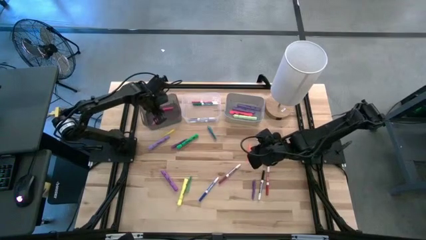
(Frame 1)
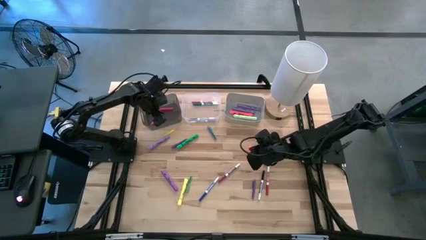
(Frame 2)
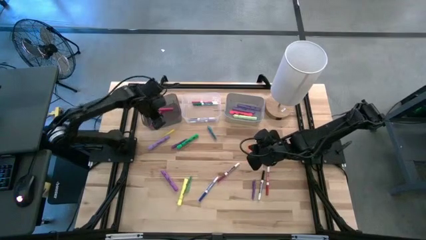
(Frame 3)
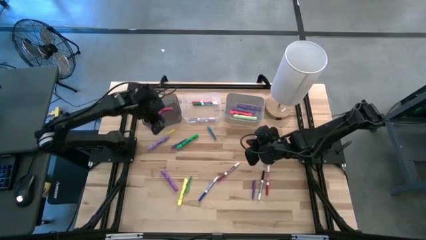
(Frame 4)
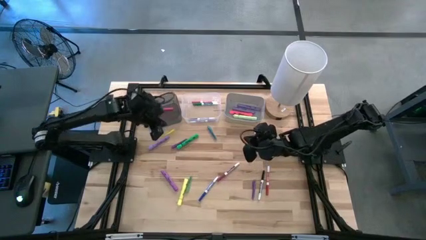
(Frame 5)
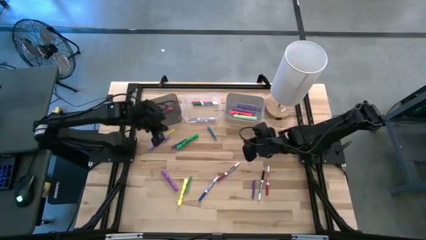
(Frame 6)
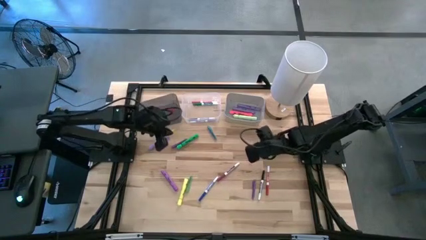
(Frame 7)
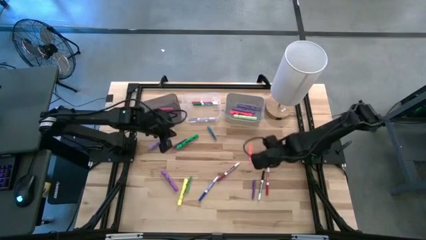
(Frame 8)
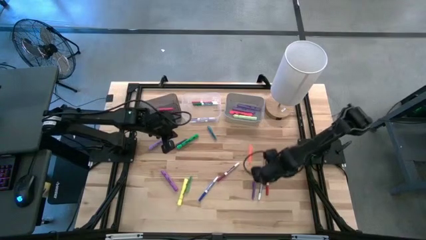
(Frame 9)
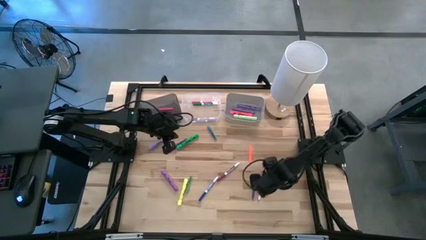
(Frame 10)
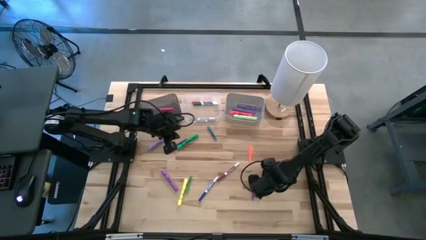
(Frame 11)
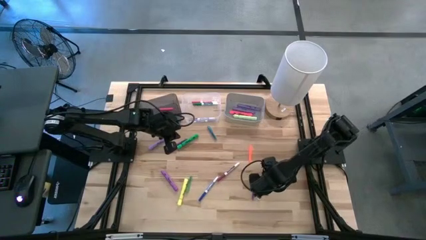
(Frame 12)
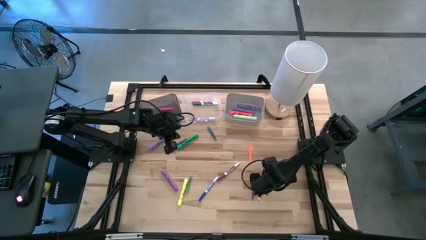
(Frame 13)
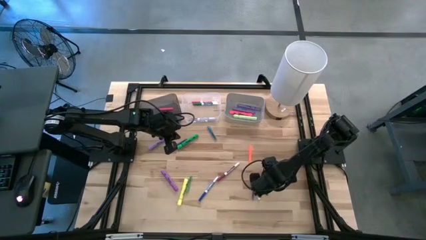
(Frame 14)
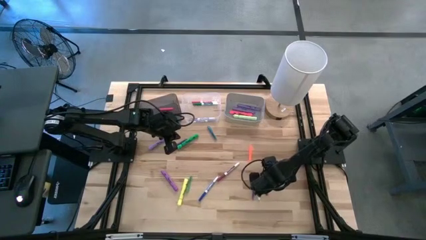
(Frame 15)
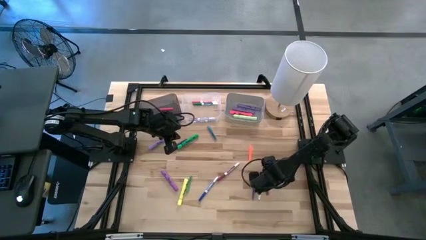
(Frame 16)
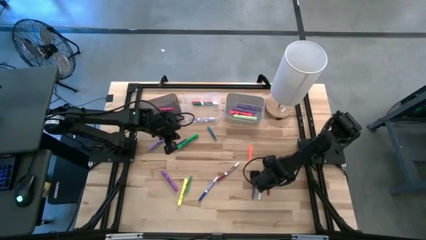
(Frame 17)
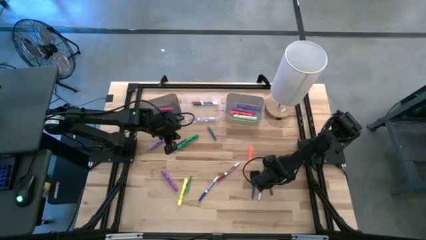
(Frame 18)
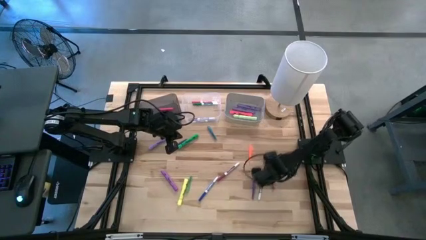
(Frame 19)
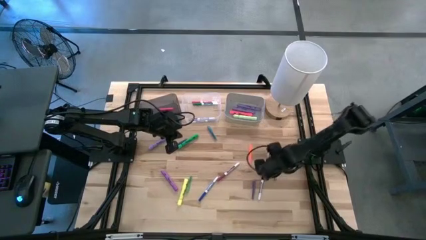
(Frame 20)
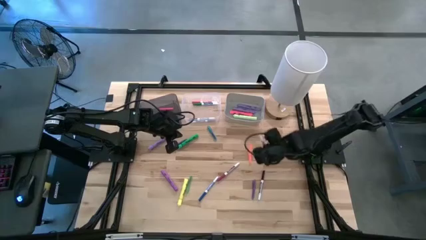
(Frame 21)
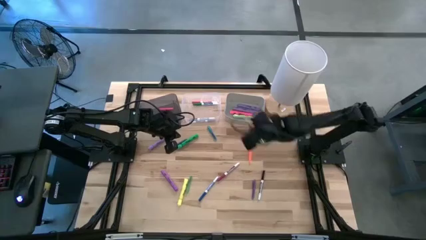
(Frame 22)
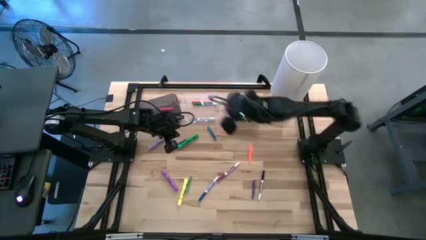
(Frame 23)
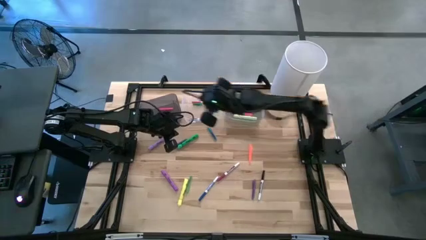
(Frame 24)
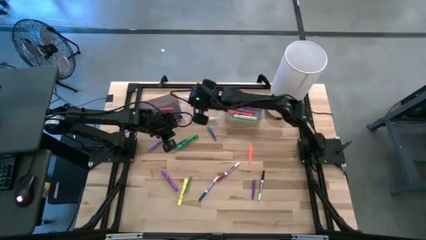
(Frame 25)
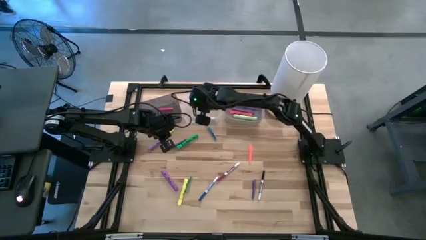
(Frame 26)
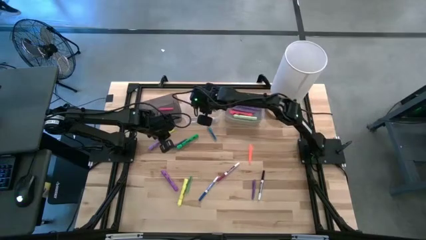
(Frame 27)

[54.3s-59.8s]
Task: Pick & Place Markers
Put the red marker pen into the transparent bin

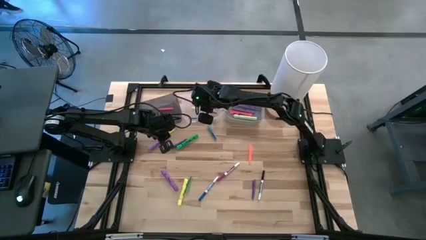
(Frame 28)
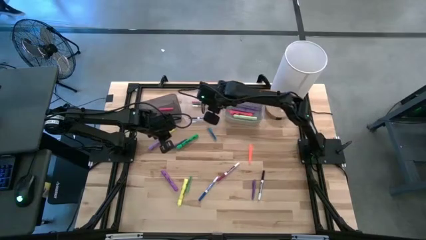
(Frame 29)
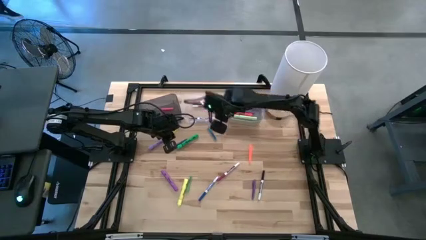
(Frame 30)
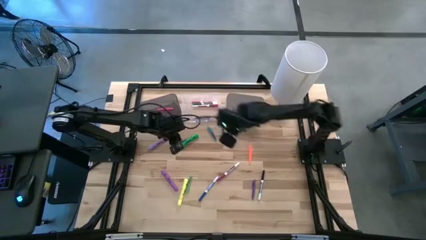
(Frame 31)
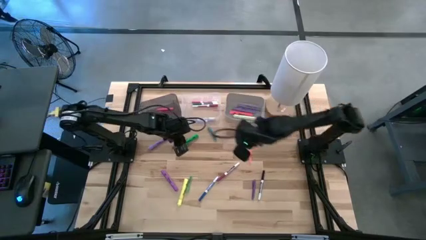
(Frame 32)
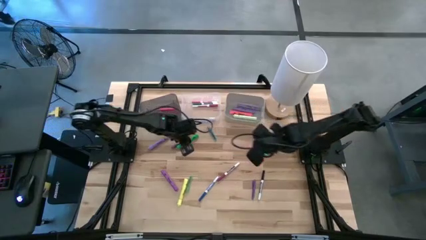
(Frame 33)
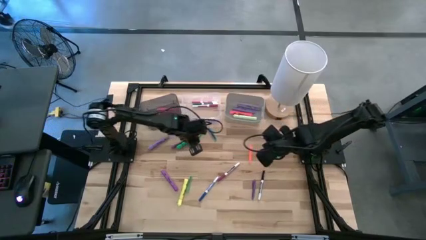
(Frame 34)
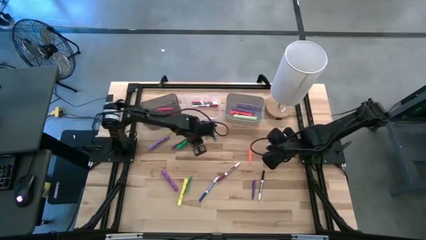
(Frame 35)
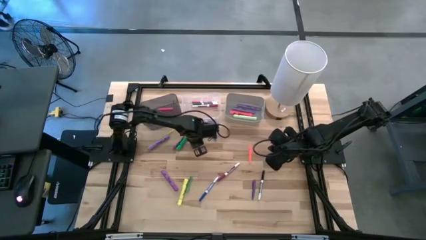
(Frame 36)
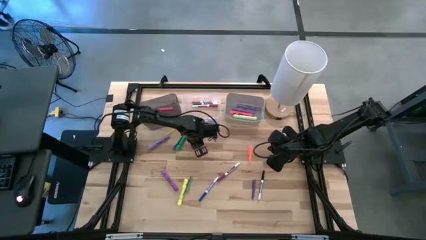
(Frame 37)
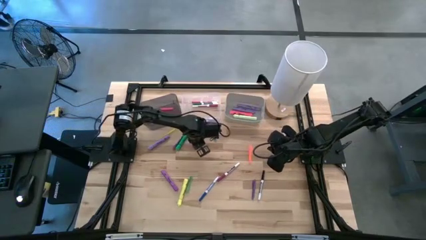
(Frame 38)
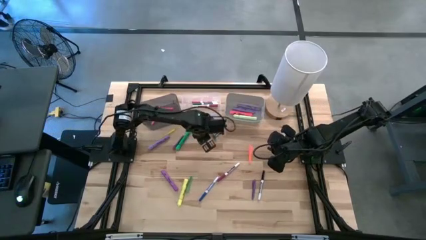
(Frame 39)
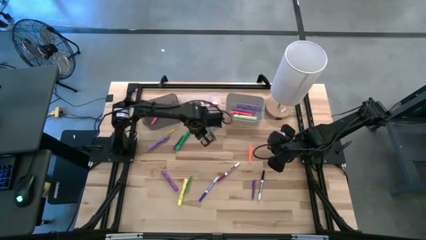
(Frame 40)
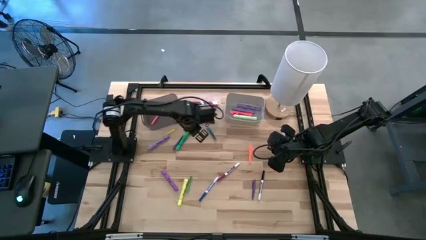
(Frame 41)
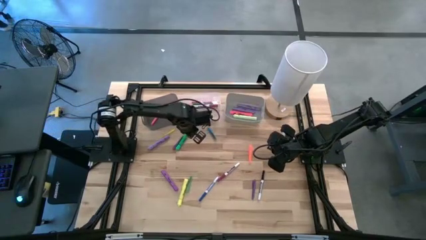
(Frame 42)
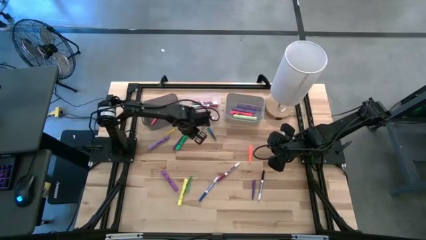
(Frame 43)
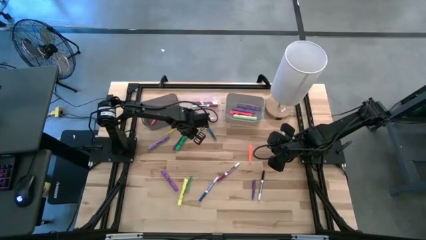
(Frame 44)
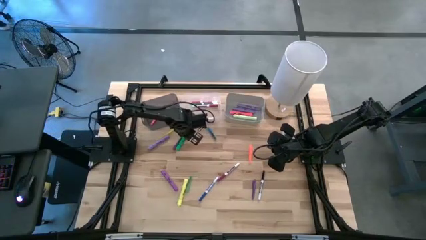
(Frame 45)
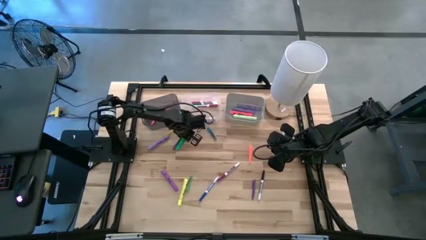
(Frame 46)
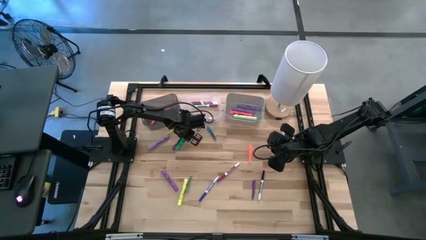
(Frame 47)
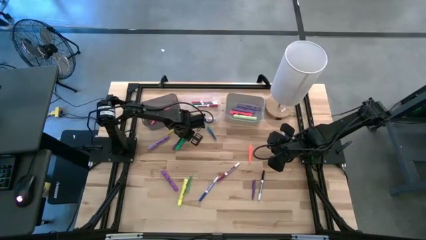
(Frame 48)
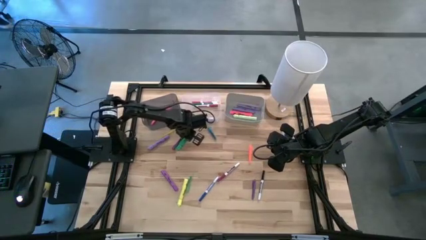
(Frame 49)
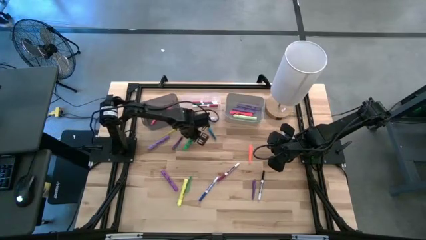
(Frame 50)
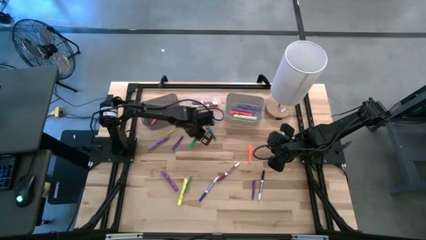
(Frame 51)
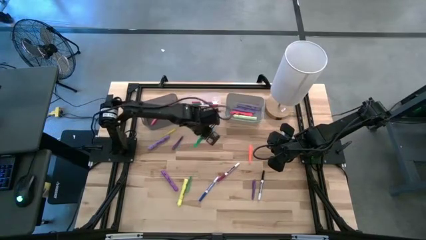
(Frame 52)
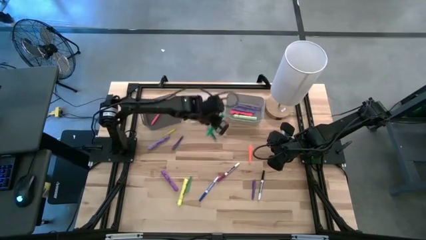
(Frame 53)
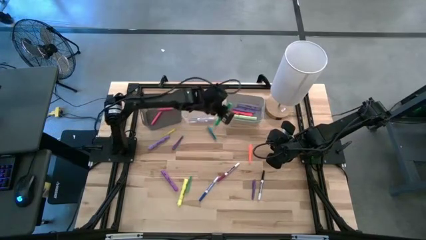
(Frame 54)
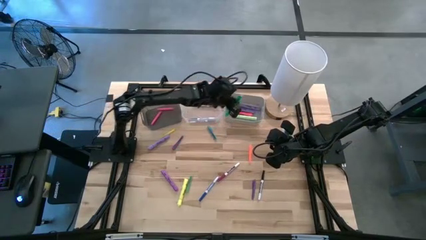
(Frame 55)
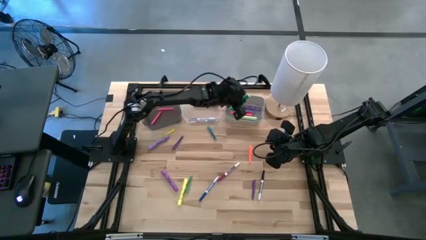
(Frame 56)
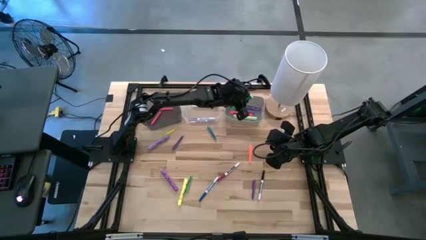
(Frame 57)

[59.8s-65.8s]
Put the green highlighter pen into the gray bin

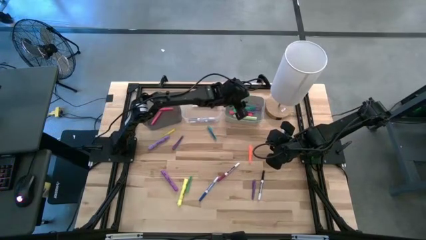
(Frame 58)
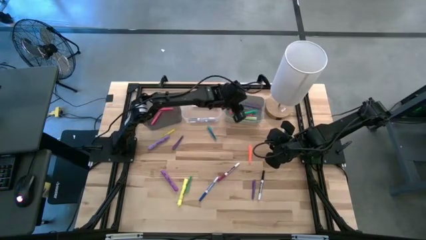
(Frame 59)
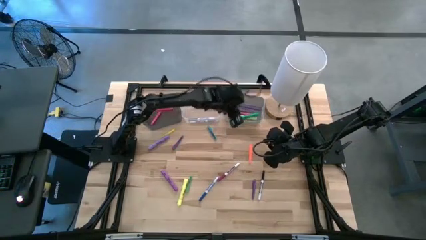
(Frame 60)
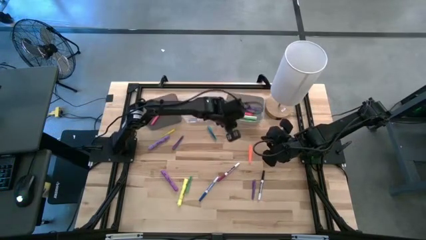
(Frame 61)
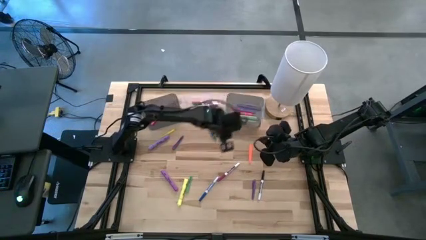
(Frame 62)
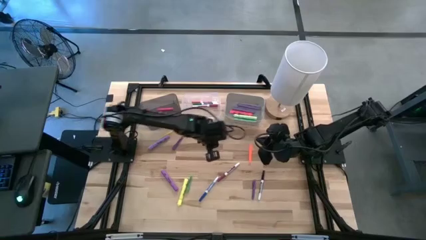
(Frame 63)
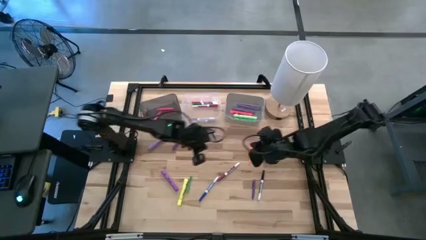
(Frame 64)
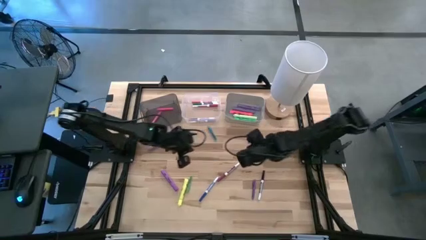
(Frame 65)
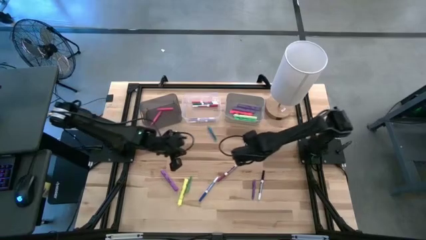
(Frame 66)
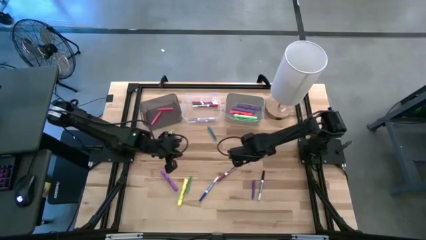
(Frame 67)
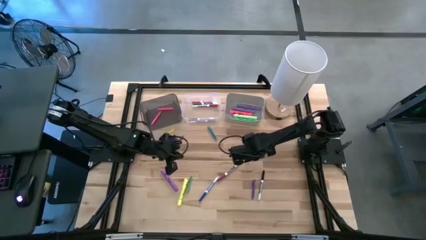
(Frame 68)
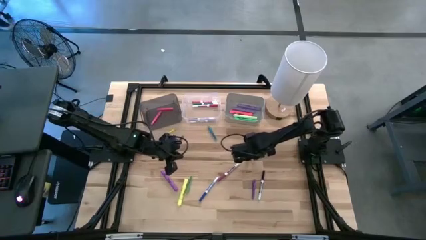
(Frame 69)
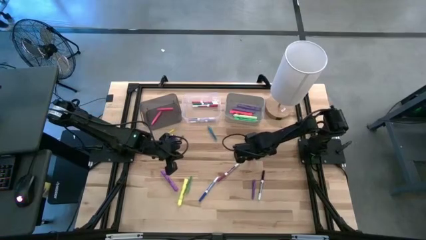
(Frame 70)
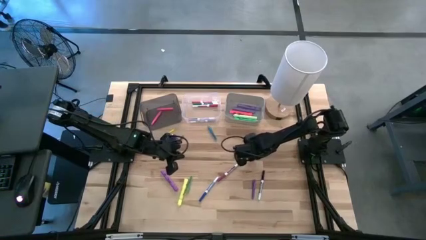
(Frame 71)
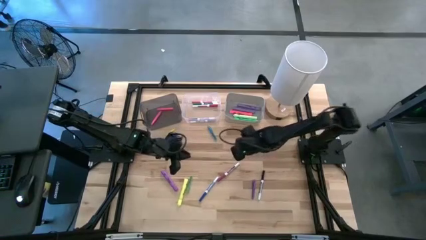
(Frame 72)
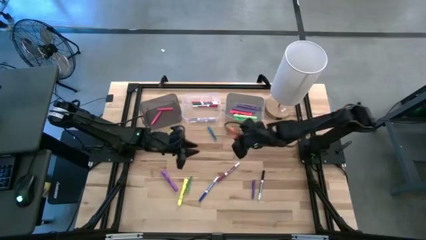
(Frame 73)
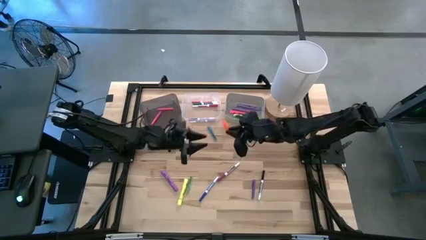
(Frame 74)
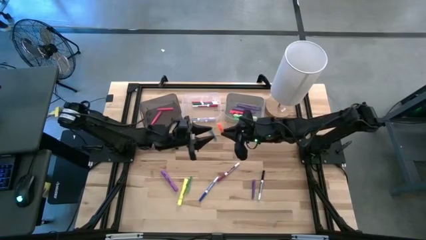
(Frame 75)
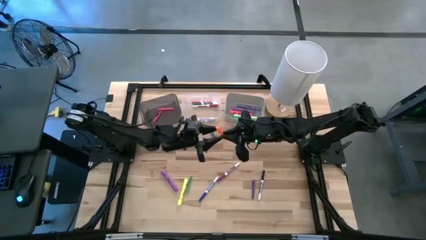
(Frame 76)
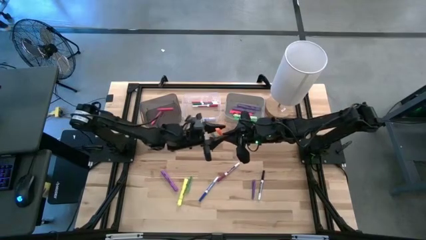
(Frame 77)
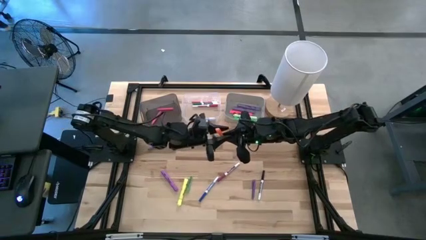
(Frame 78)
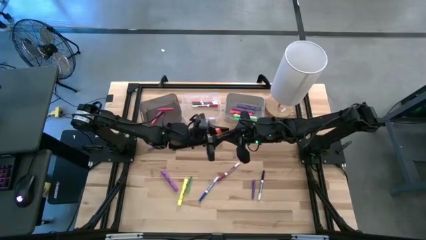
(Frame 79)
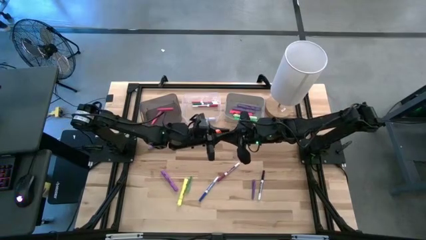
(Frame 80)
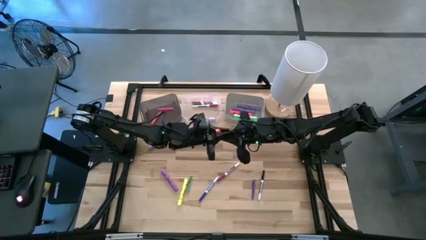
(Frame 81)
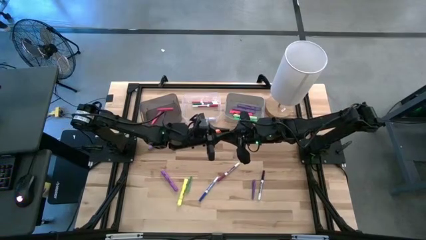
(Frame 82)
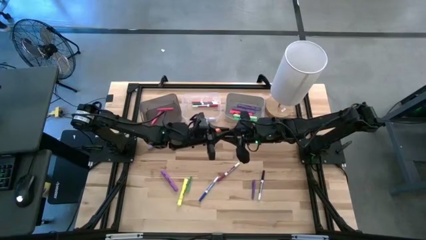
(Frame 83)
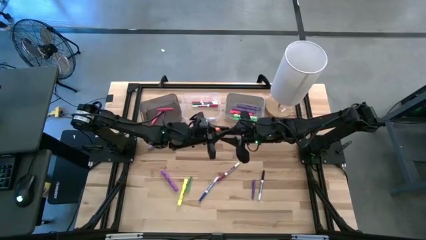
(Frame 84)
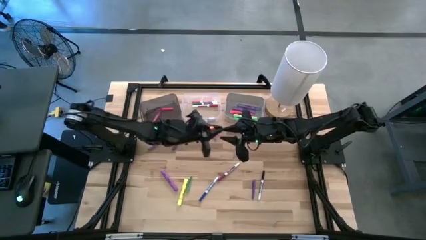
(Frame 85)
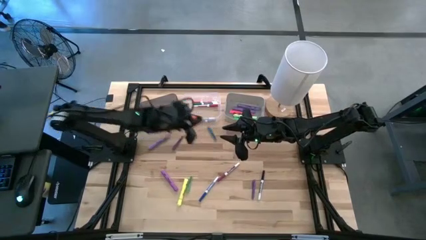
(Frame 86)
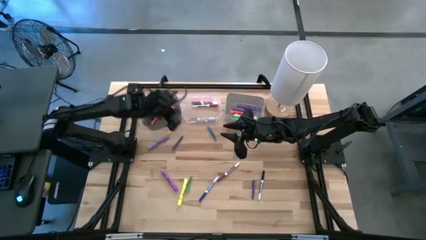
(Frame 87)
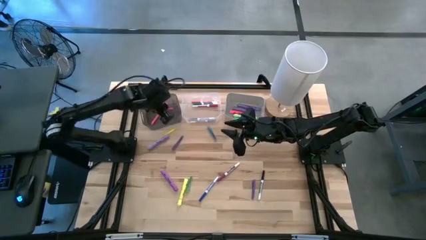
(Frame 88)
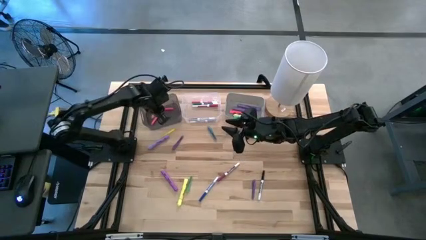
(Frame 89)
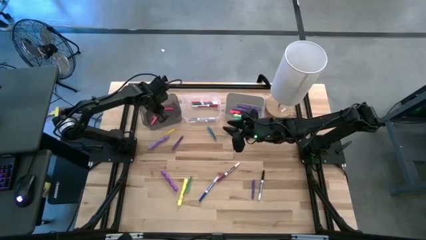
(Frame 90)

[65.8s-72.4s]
Put the orange pen into the black bin
